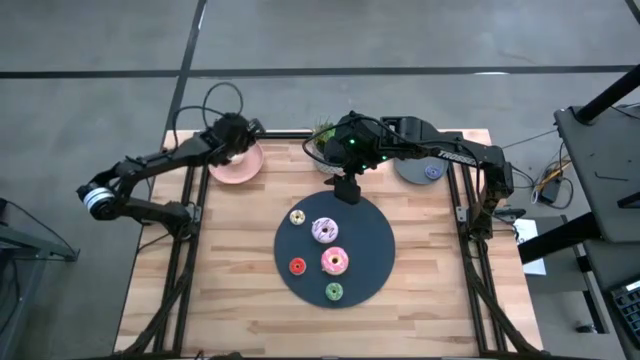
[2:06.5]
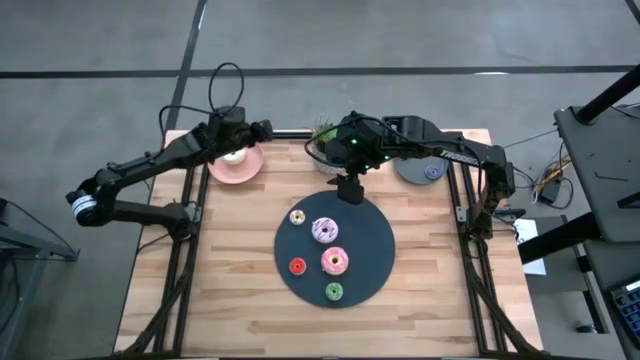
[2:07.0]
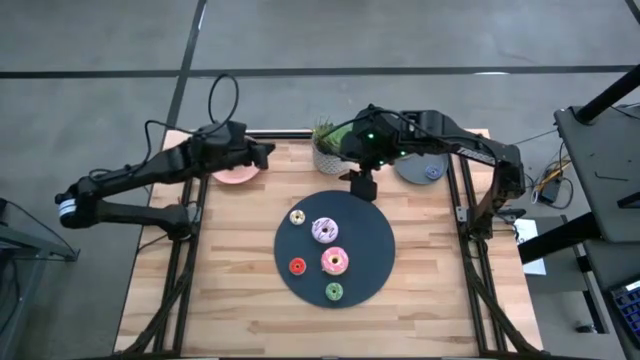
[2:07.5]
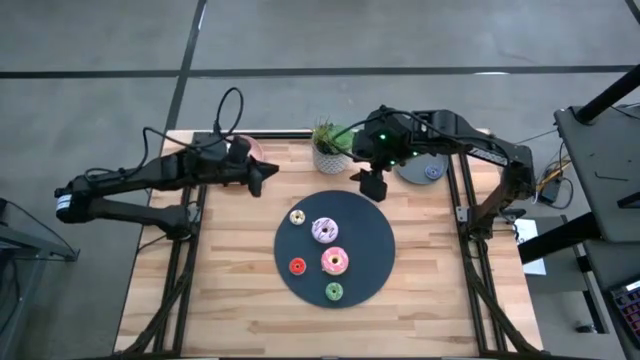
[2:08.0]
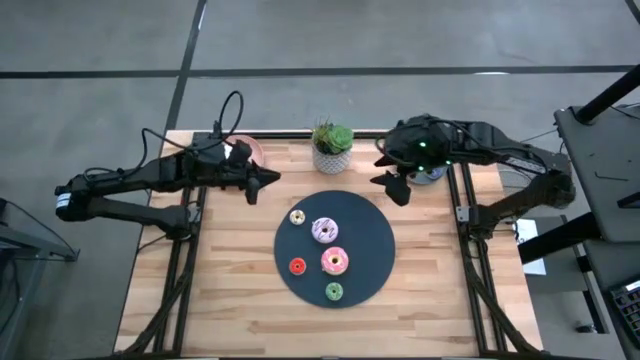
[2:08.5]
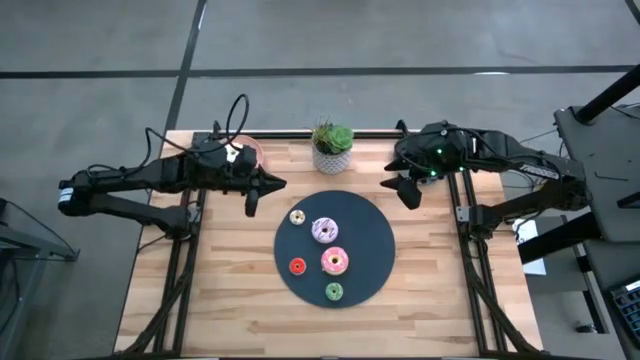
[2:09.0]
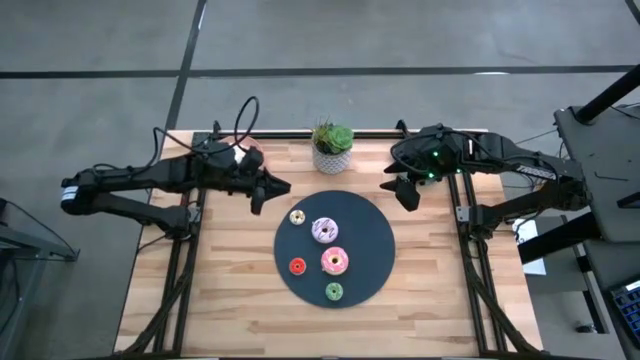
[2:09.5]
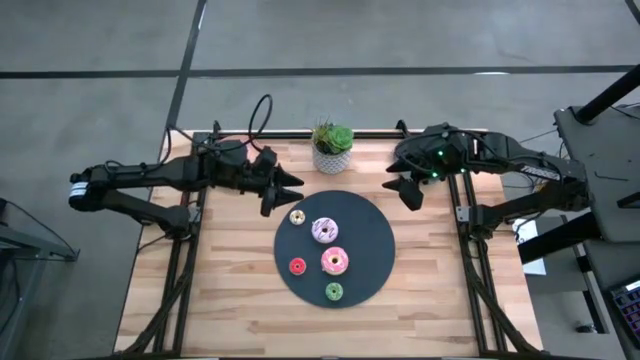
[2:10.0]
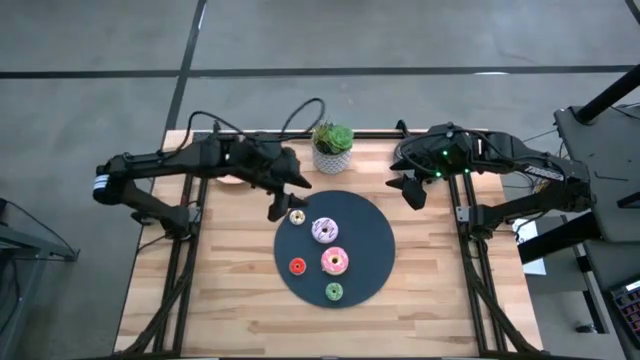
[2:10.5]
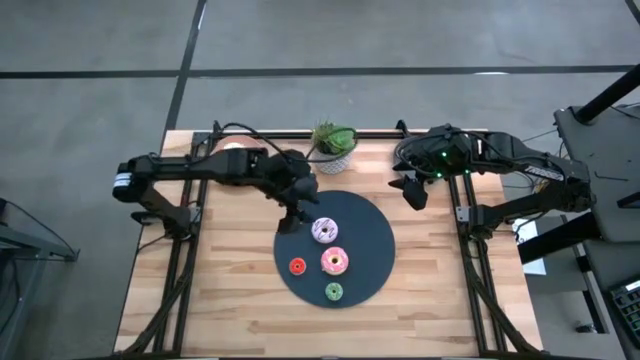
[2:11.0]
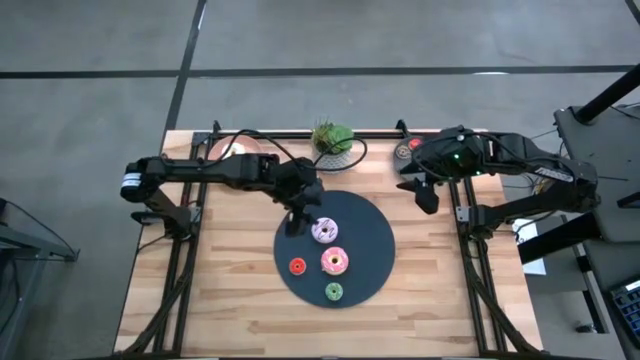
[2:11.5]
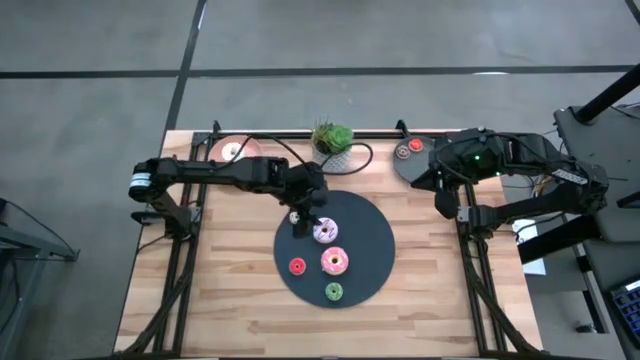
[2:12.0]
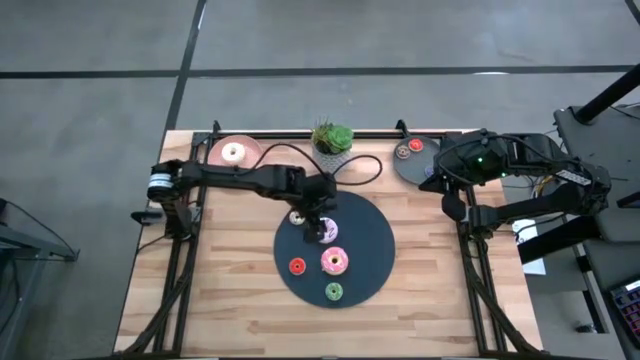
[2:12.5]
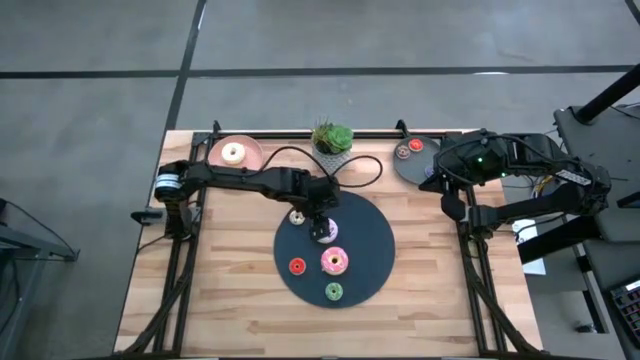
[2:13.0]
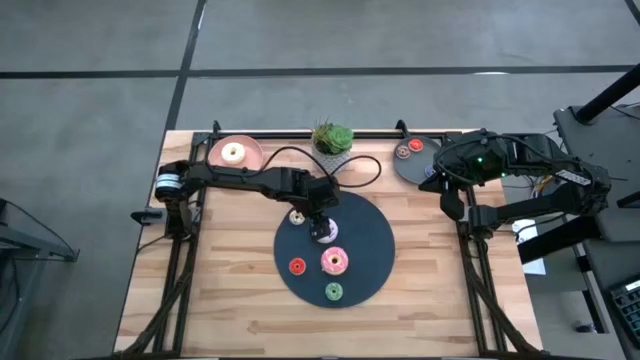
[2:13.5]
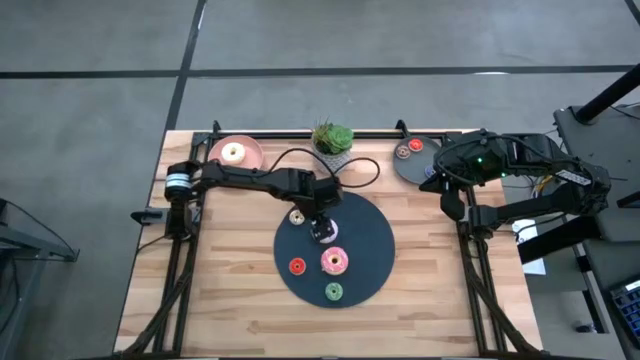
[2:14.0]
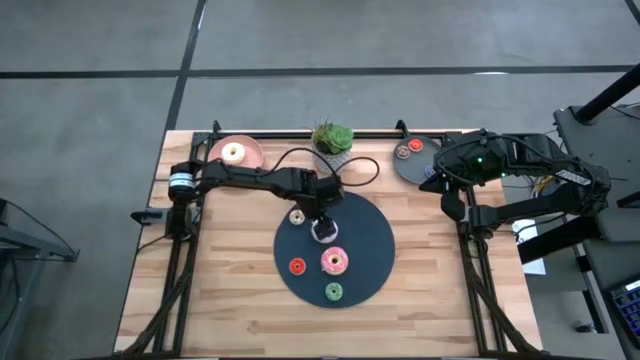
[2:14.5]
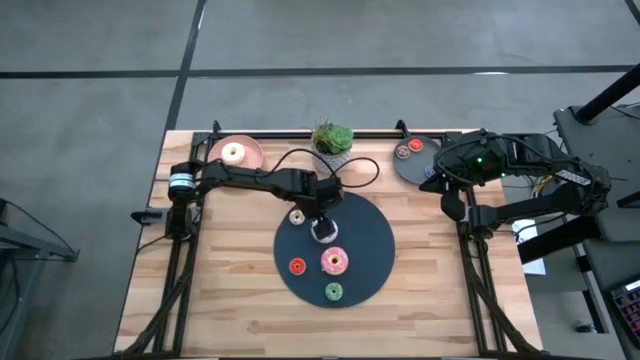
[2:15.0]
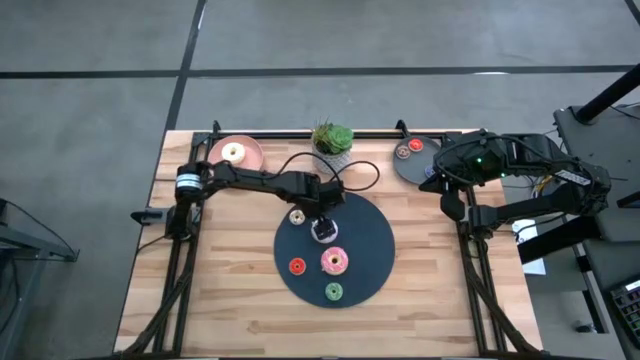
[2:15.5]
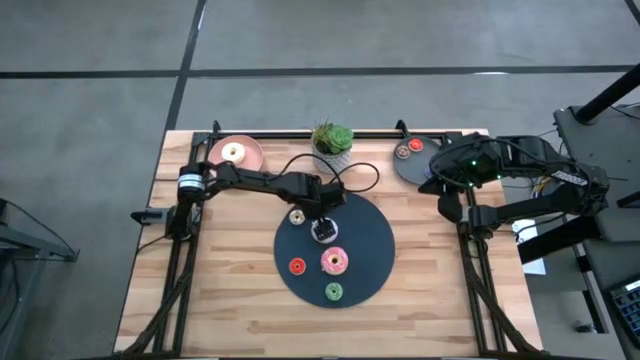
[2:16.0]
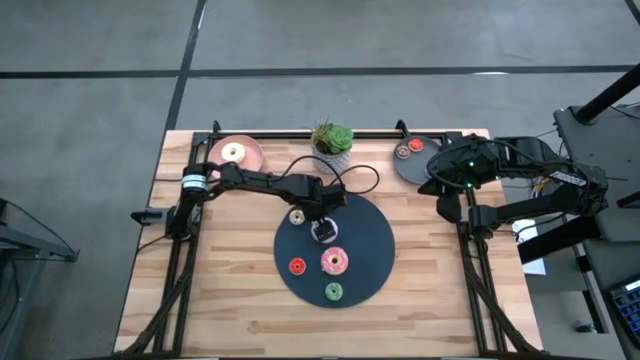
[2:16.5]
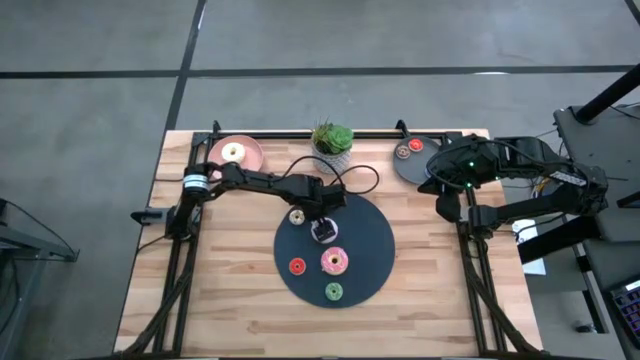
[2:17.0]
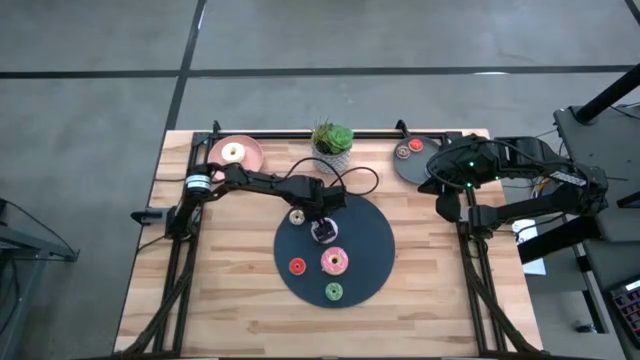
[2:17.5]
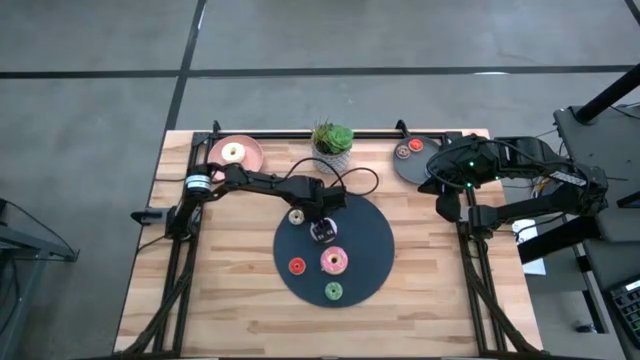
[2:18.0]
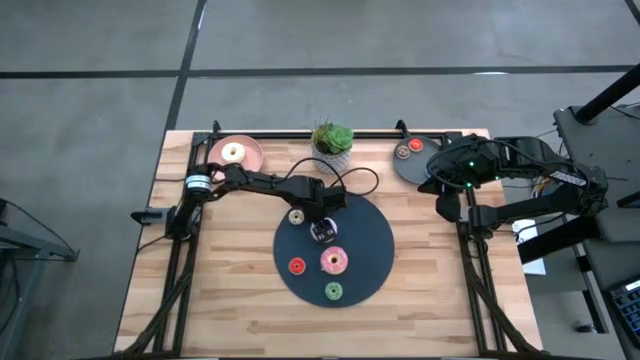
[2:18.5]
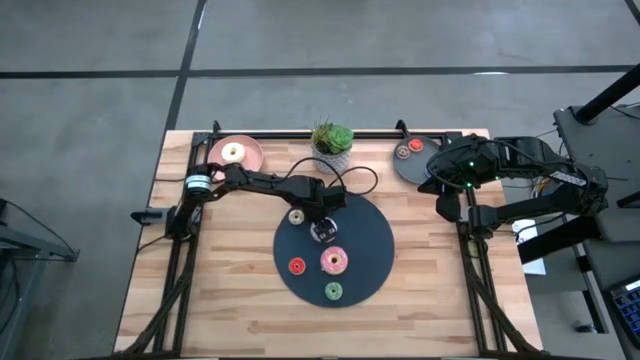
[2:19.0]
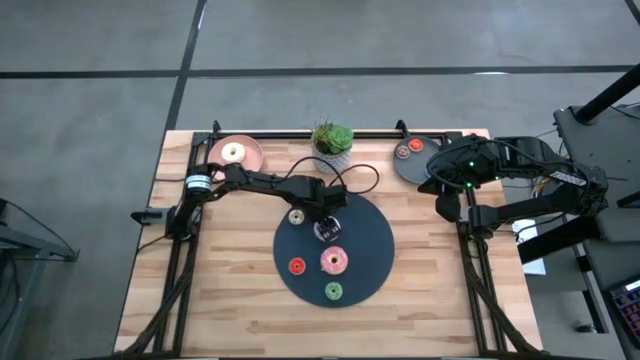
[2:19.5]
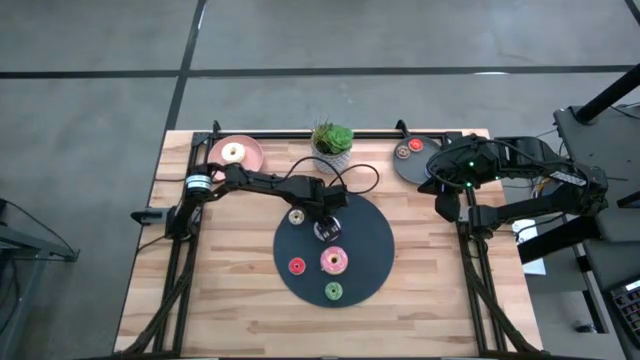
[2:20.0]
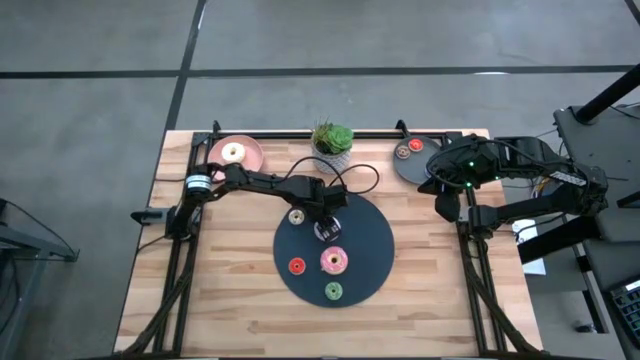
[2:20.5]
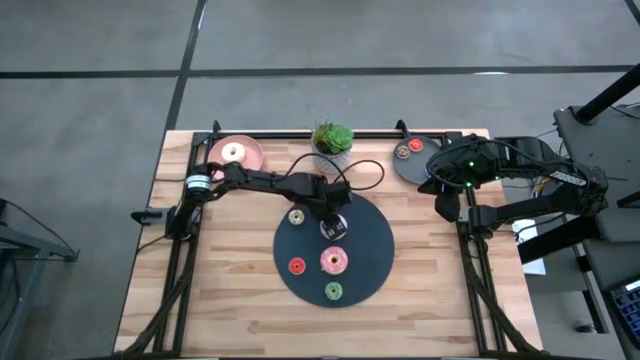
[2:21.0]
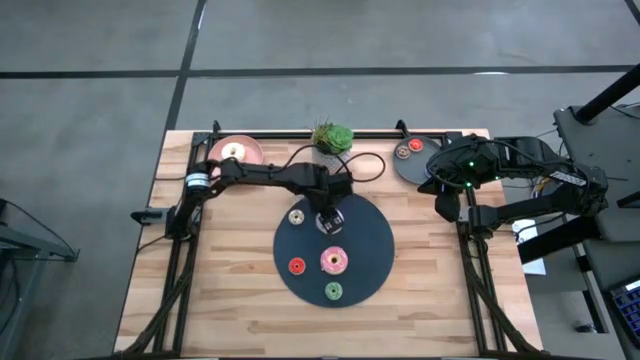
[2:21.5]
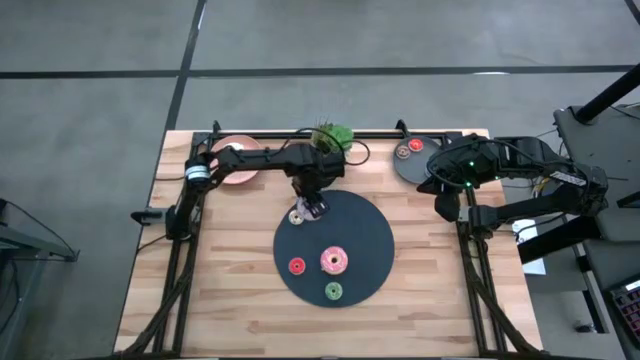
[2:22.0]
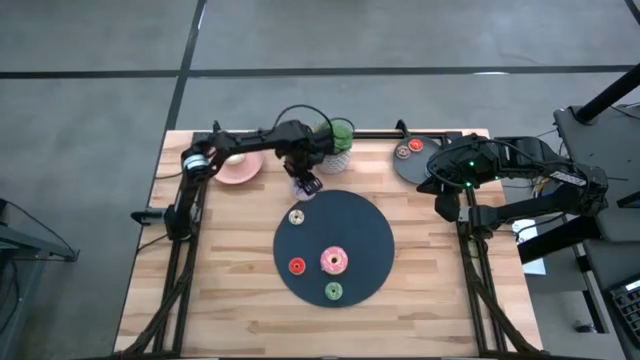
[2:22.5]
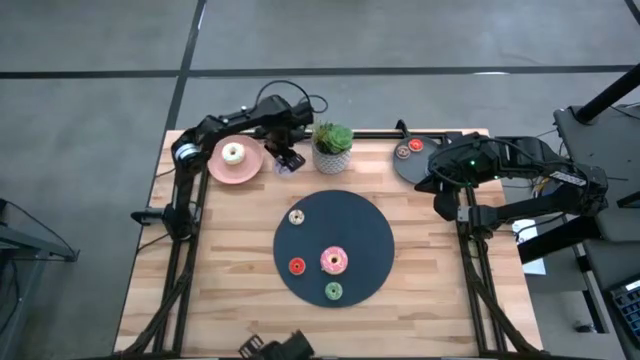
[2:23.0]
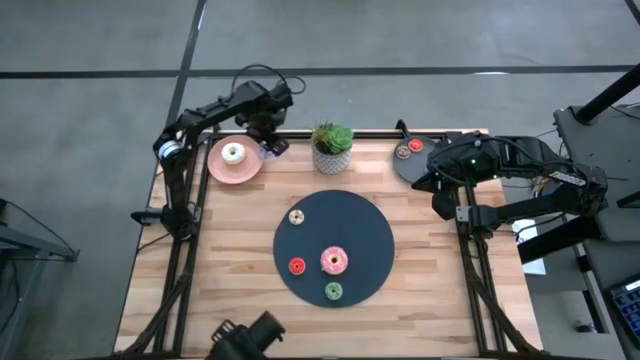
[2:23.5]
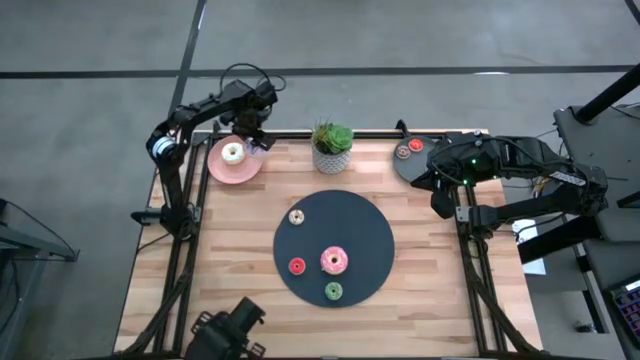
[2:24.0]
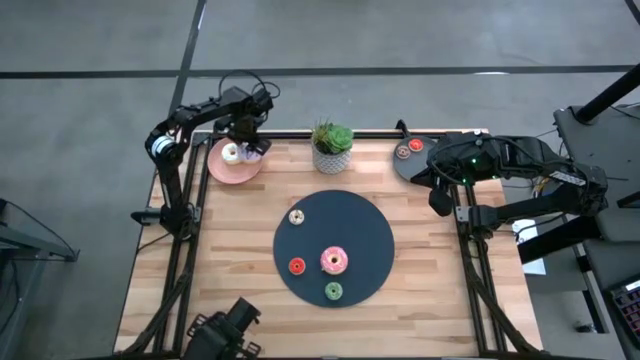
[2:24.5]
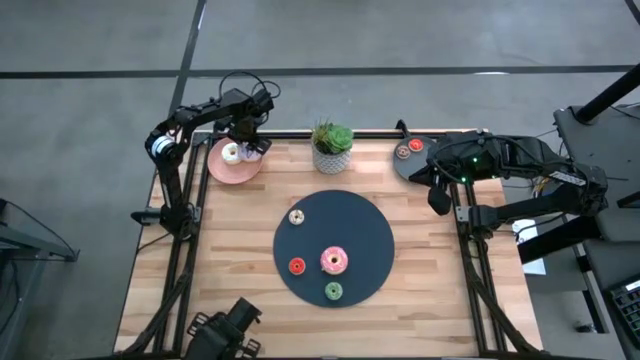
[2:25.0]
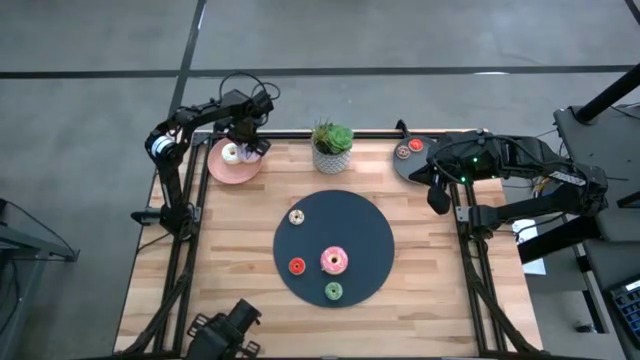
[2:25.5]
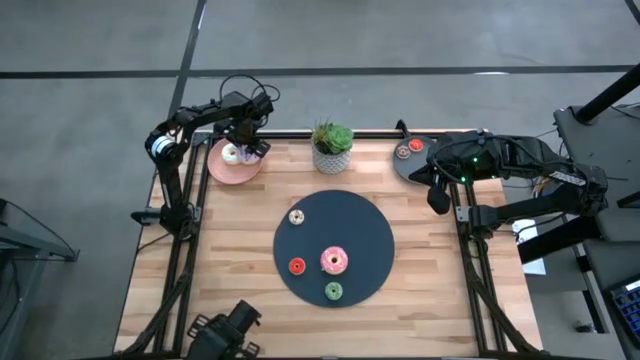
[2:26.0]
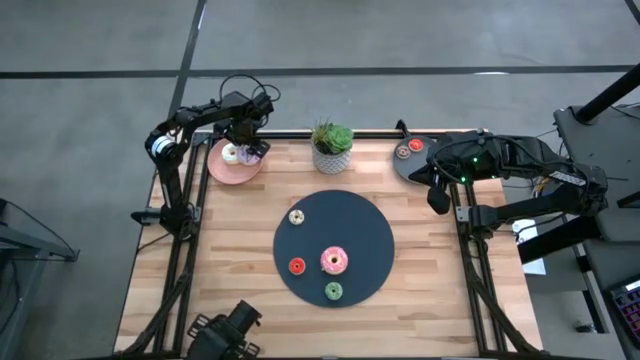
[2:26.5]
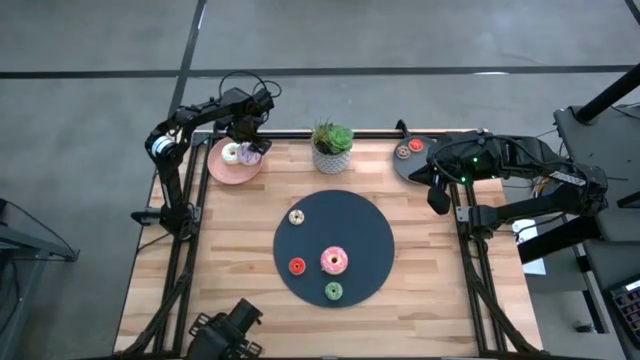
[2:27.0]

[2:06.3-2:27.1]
Task: Pick & Place donuts
Put the large purple donut on the pink plate
